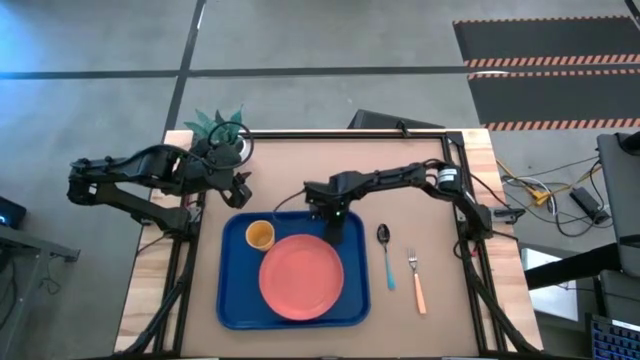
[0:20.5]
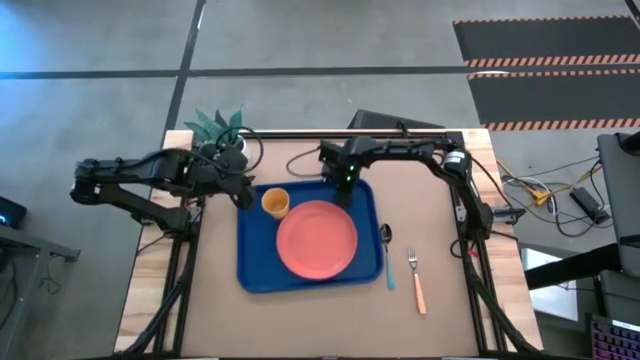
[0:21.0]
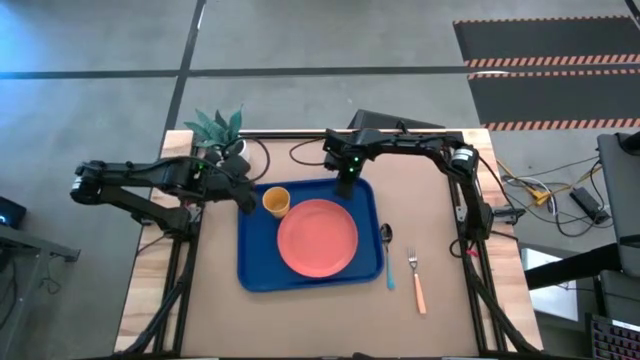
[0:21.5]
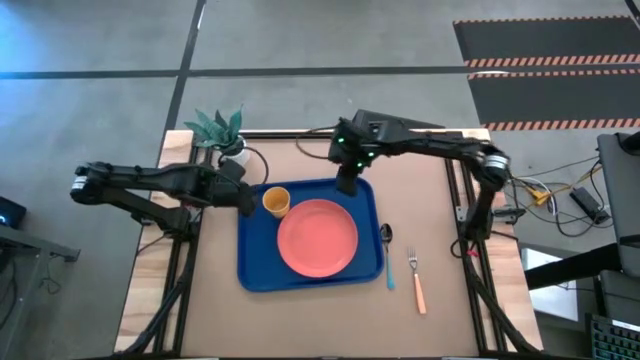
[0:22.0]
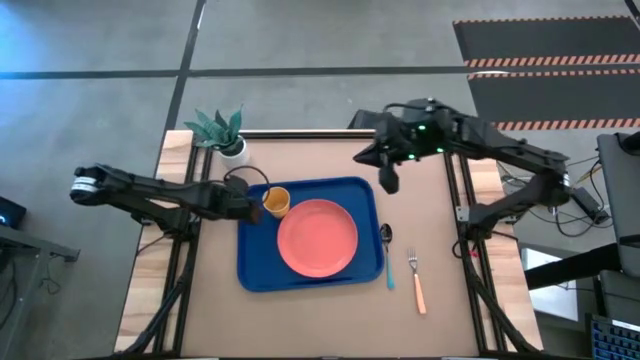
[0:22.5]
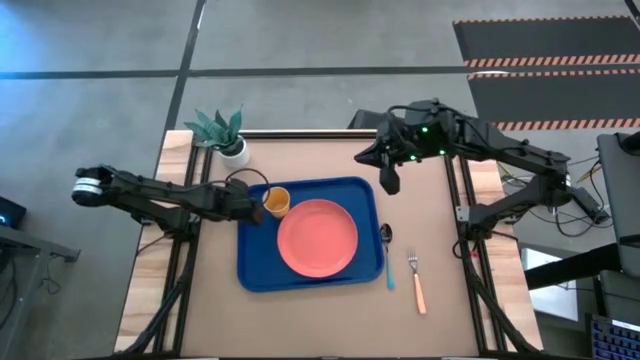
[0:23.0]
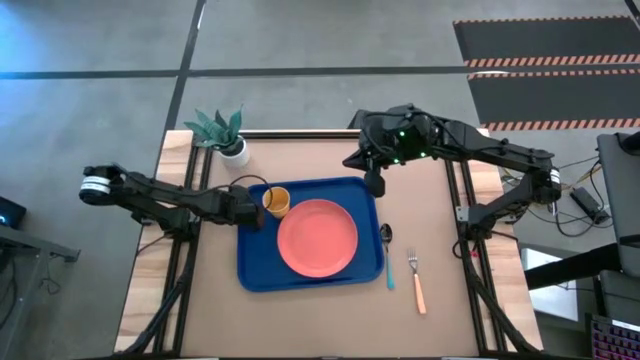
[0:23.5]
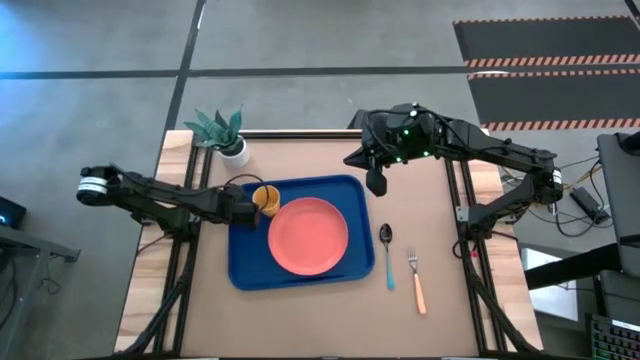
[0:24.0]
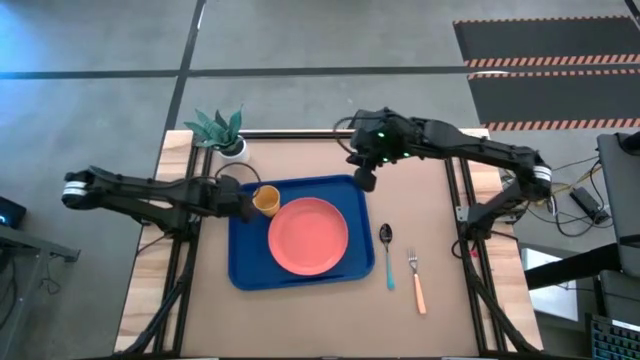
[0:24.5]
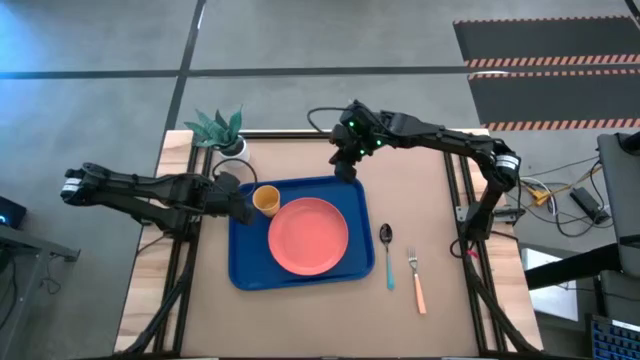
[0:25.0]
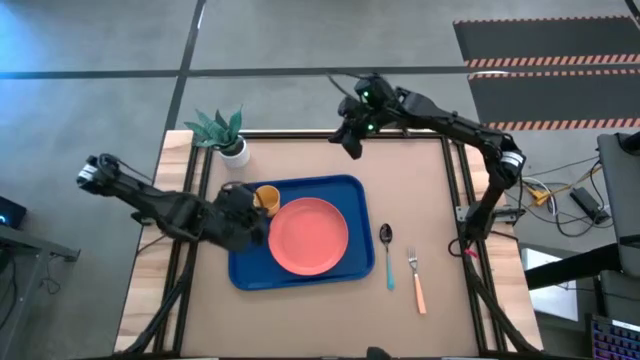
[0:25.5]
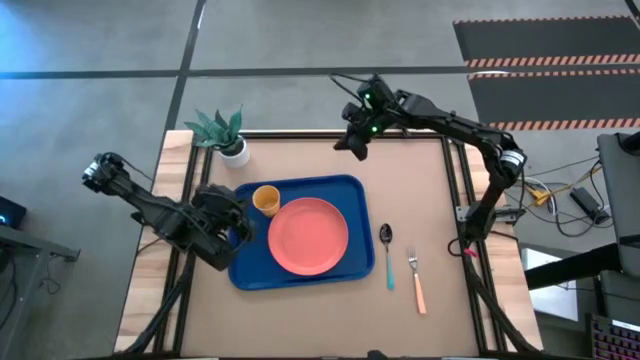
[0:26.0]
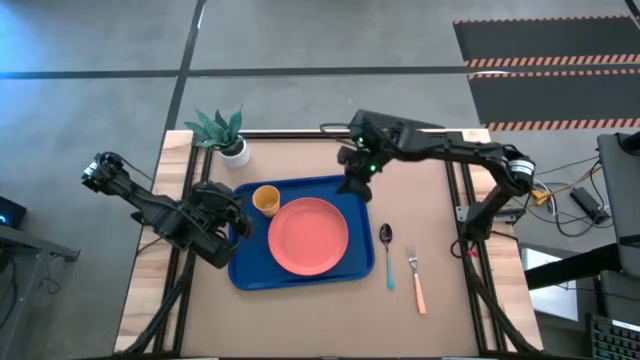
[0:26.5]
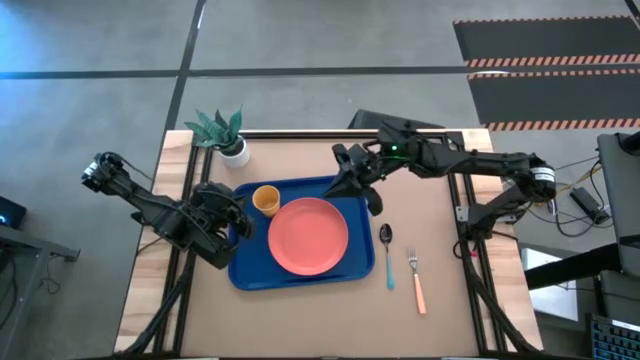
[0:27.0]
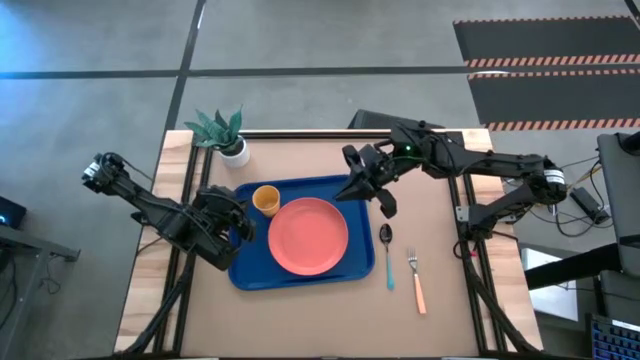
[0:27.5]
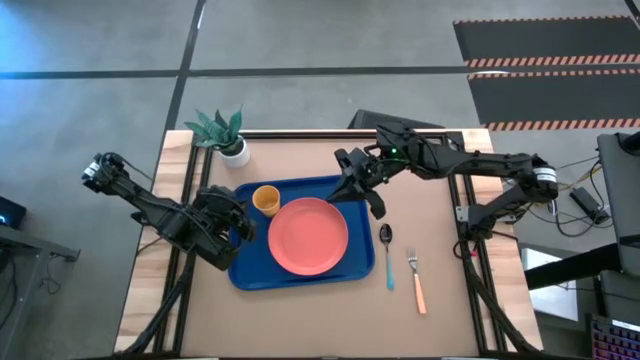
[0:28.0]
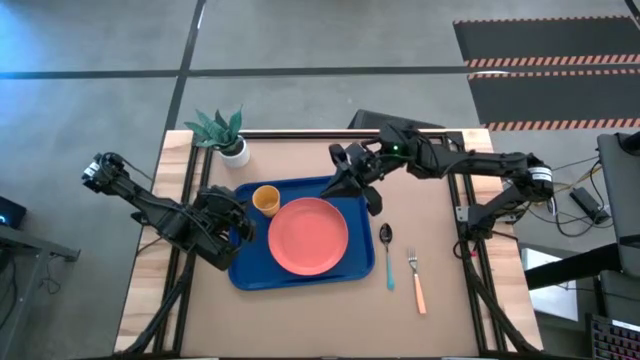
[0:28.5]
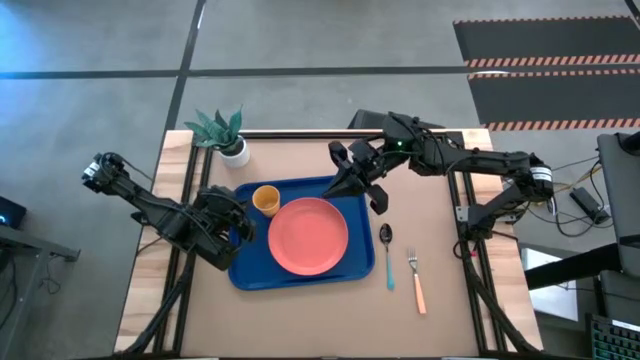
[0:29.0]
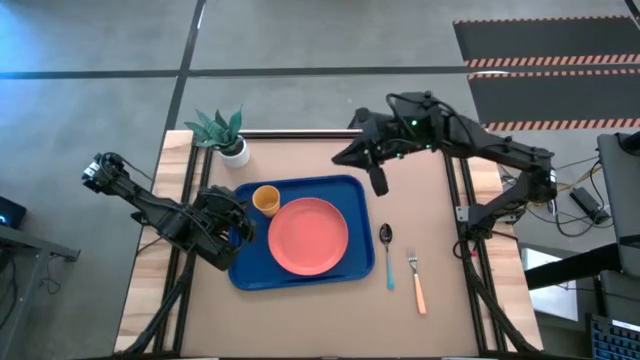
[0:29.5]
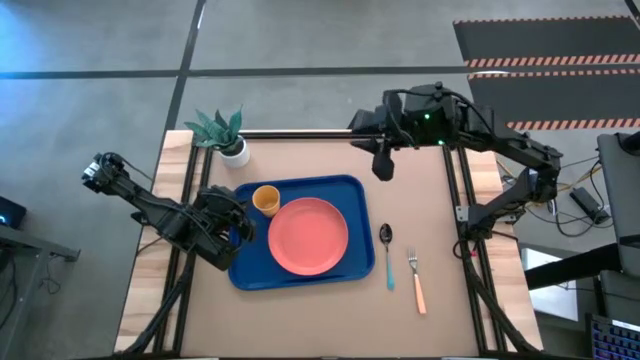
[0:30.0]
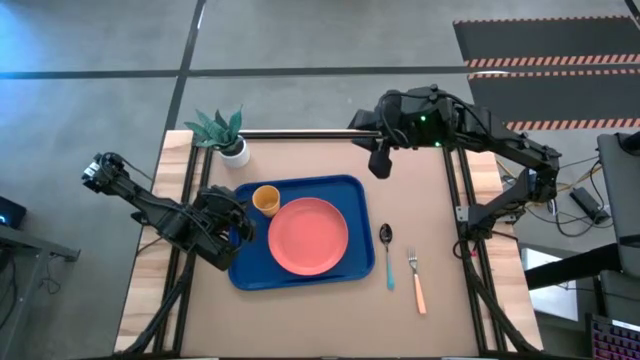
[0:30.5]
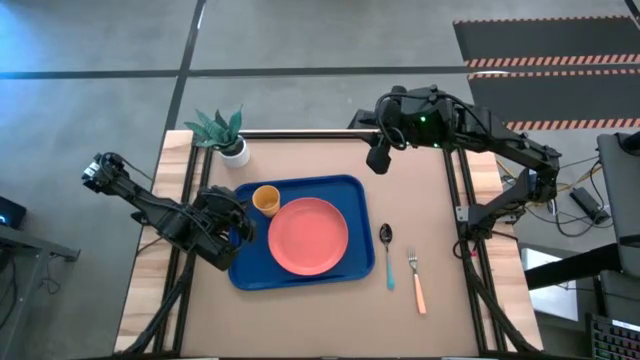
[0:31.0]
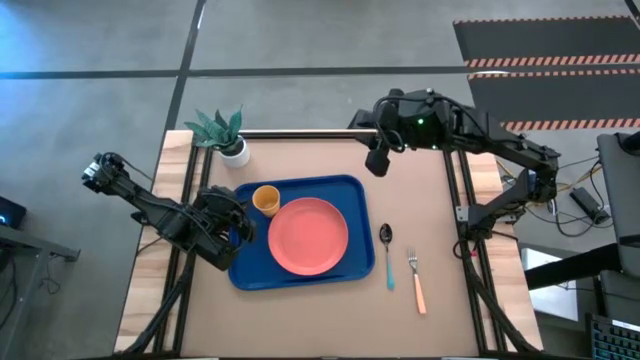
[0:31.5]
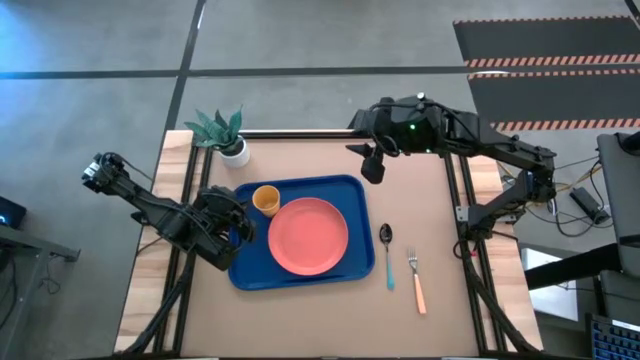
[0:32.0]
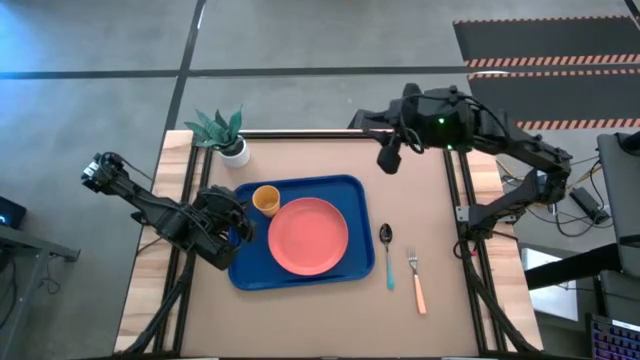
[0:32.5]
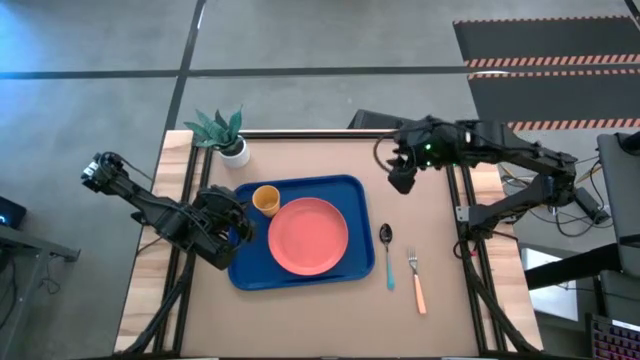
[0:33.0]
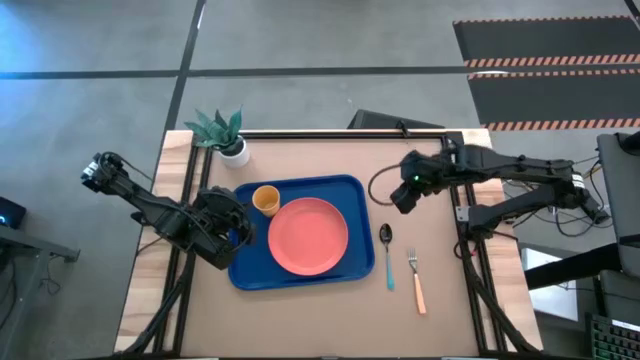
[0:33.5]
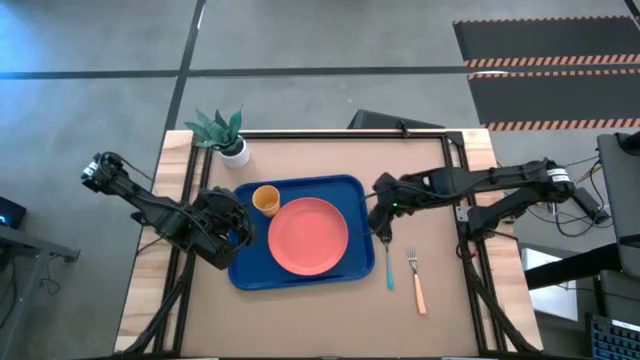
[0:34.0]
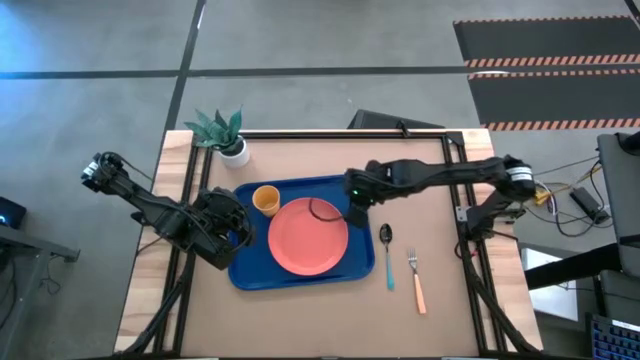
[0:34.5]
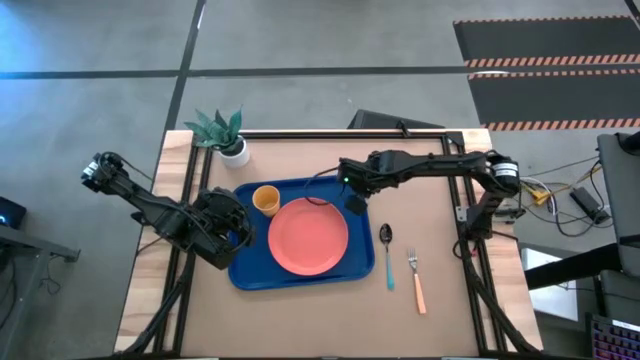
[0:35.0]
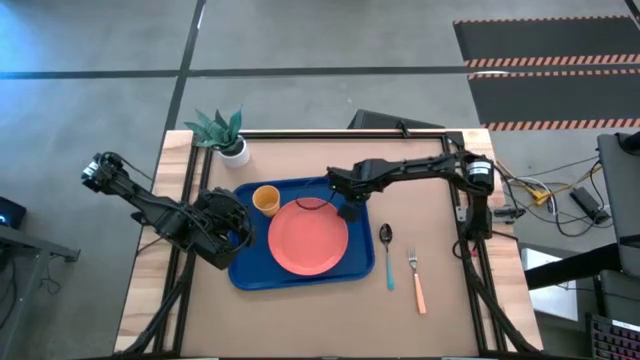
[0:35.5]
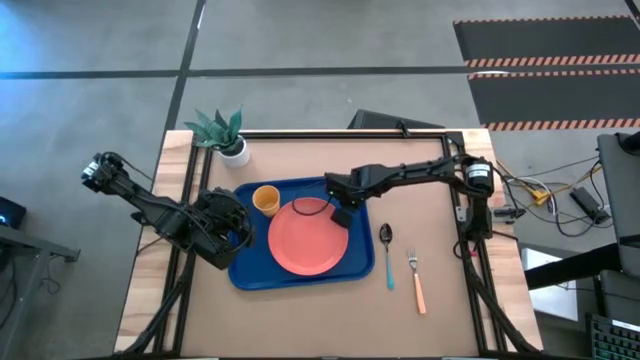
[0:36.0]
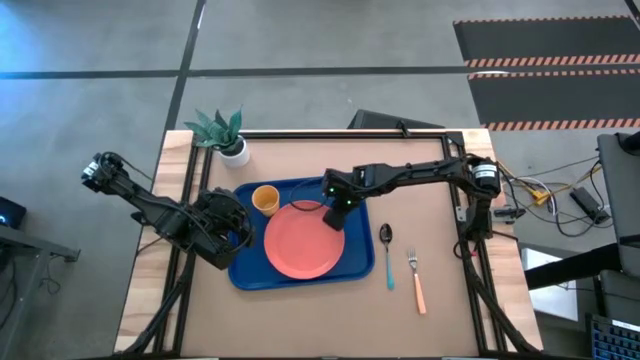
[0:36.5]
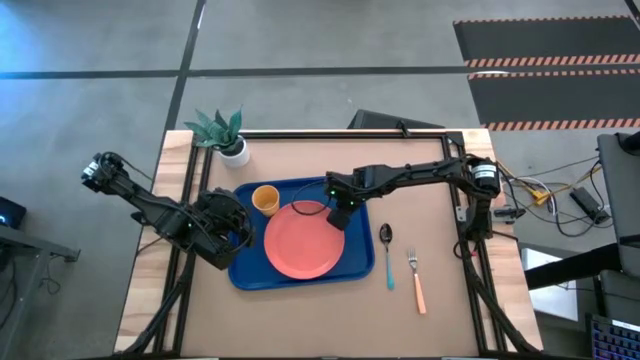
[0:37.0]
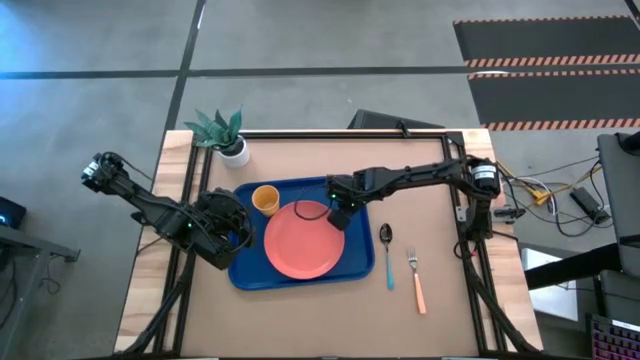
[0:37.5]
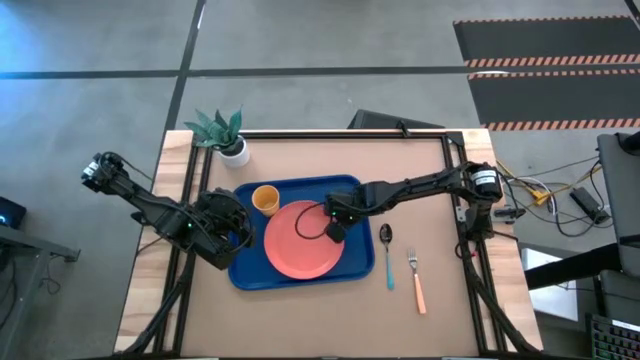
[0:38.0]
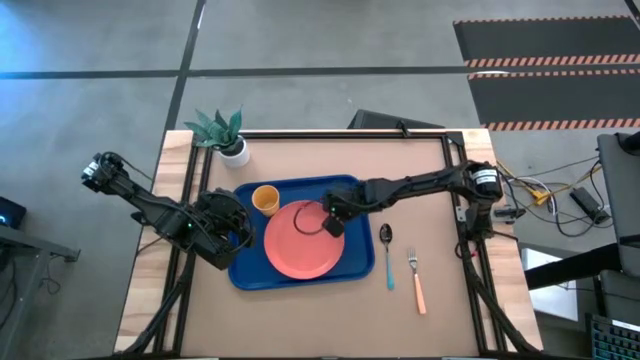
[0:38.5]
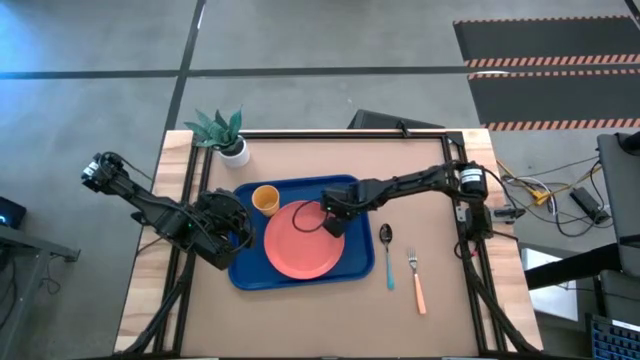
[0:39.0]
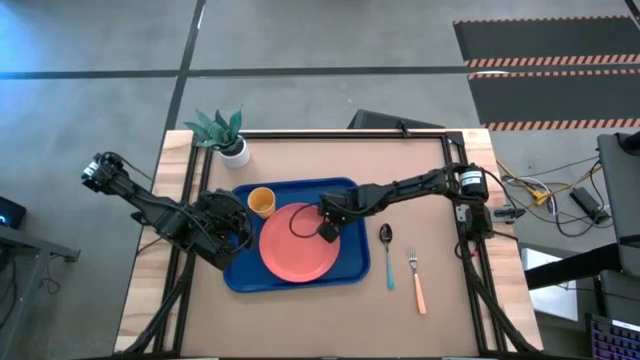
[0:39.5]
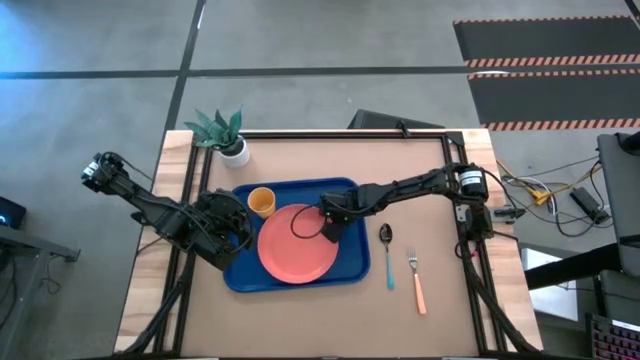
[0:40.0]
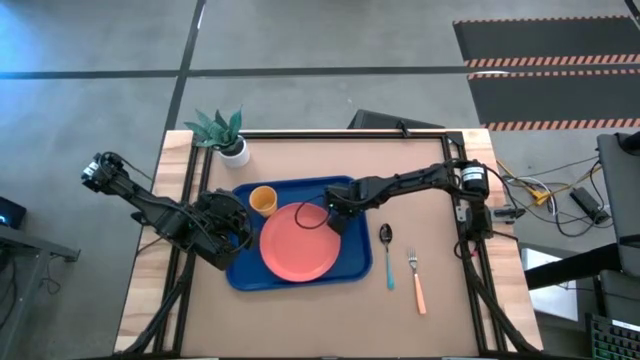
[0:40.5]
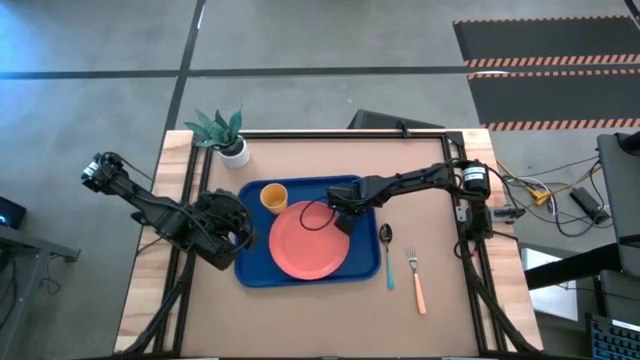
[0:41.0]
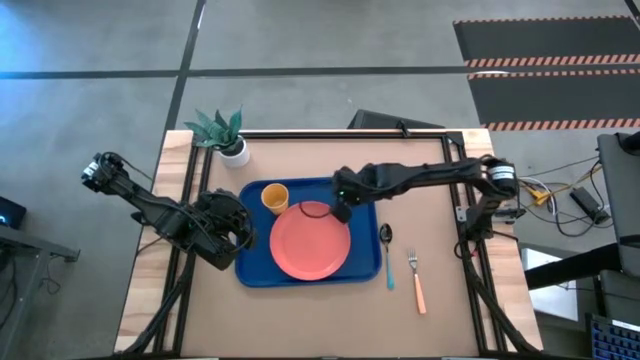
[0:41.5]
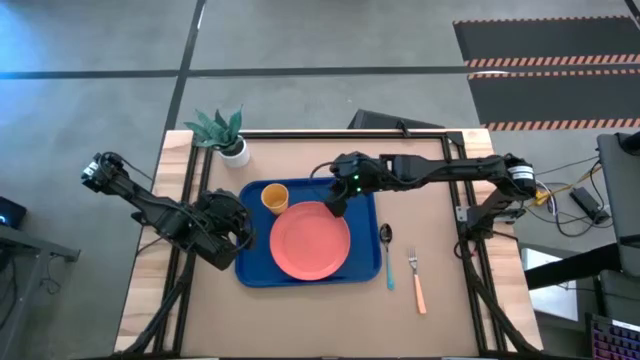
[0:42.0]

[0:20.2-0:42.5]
Task: Pick and place plate/cup/fork/spoon on tray
Adjust the blue tray
